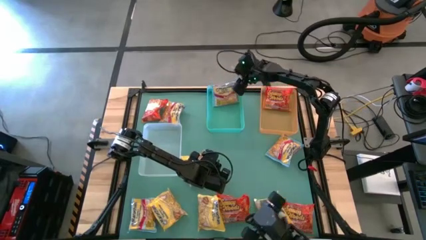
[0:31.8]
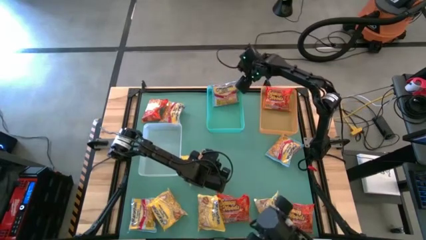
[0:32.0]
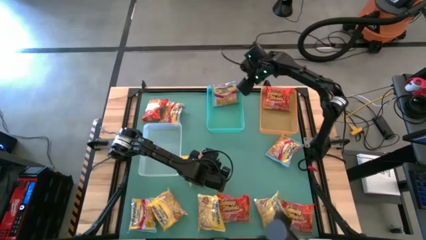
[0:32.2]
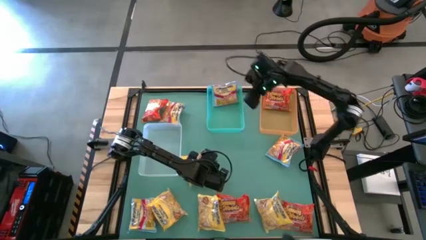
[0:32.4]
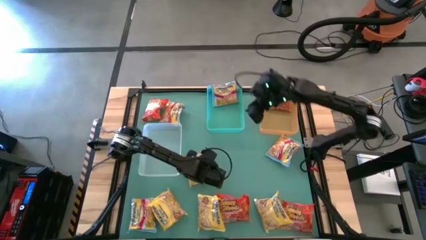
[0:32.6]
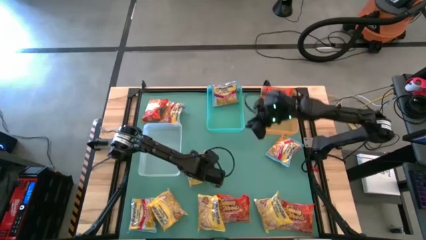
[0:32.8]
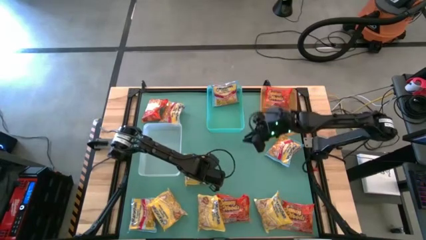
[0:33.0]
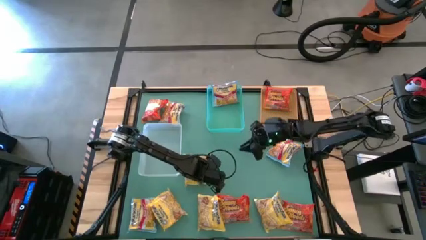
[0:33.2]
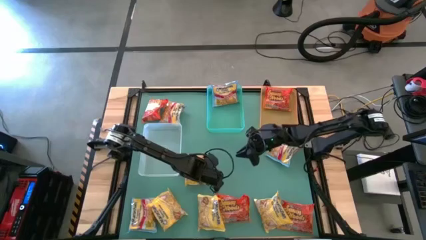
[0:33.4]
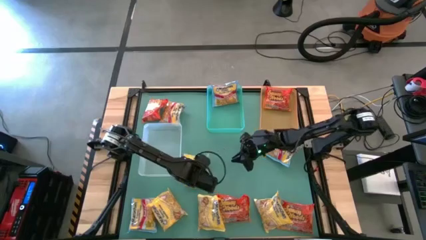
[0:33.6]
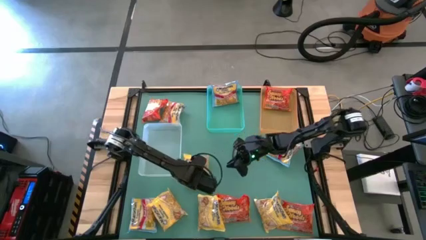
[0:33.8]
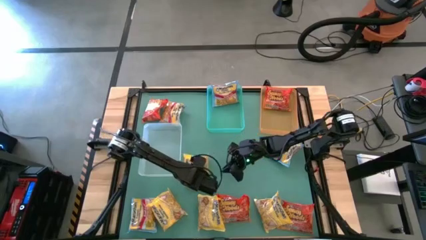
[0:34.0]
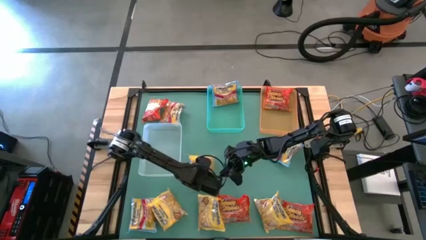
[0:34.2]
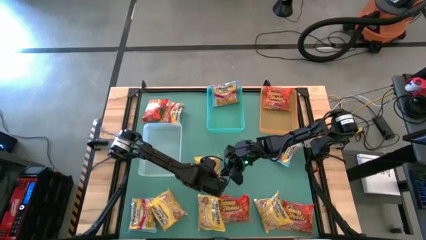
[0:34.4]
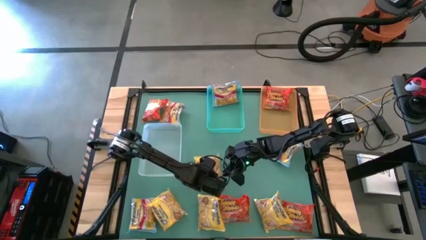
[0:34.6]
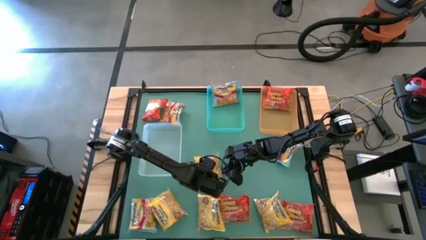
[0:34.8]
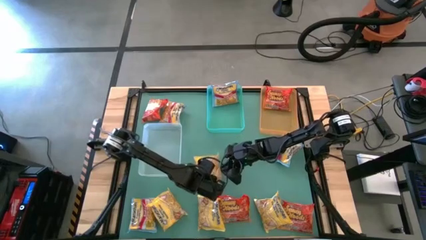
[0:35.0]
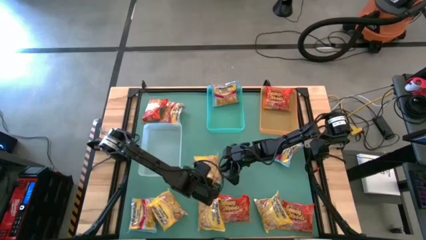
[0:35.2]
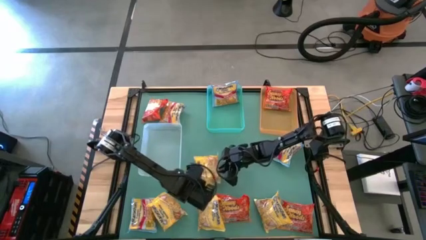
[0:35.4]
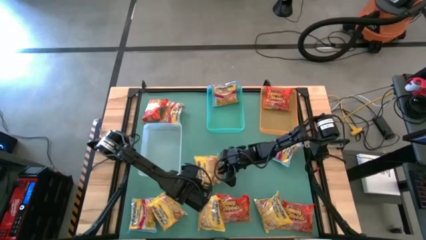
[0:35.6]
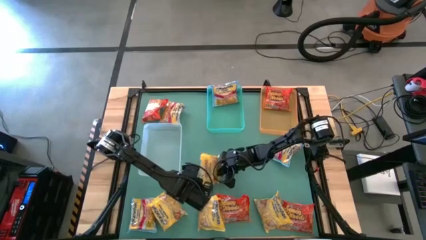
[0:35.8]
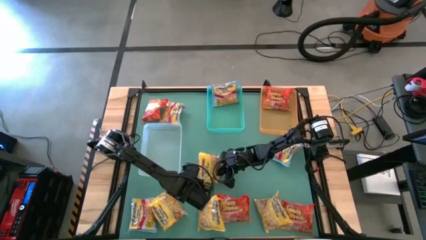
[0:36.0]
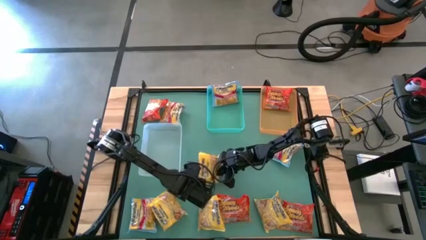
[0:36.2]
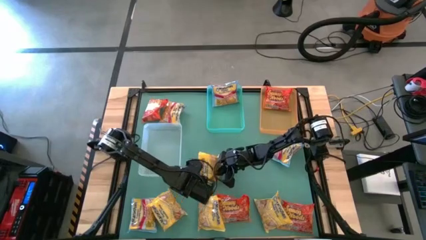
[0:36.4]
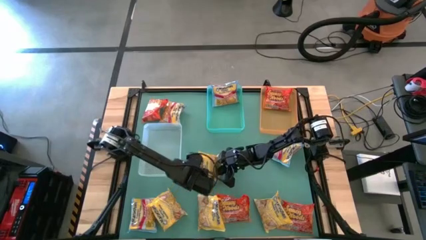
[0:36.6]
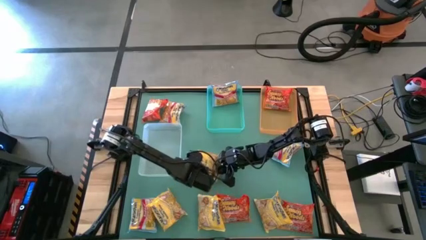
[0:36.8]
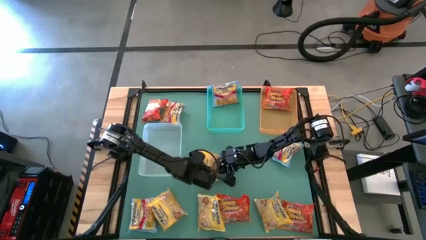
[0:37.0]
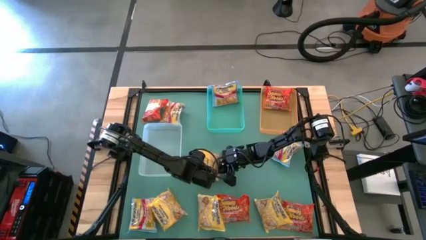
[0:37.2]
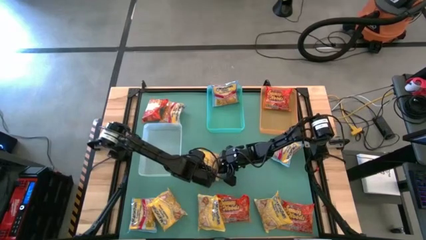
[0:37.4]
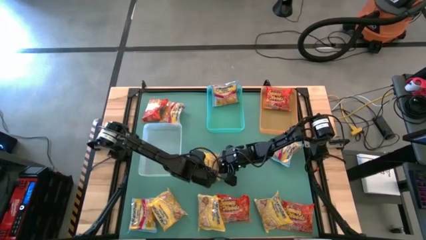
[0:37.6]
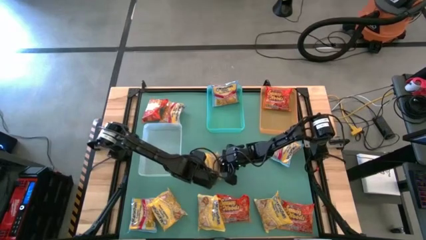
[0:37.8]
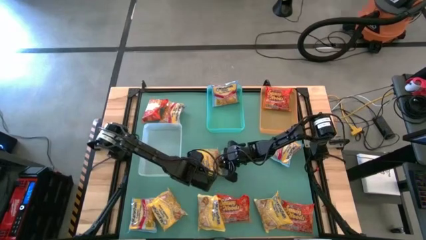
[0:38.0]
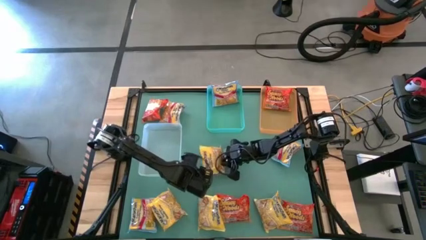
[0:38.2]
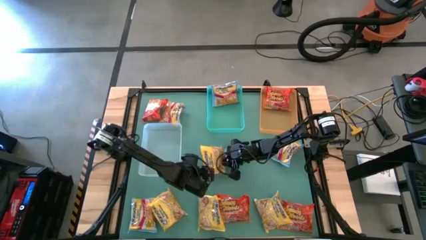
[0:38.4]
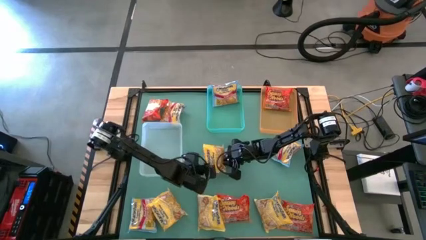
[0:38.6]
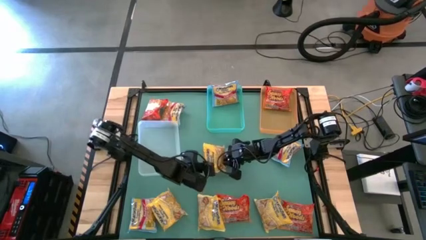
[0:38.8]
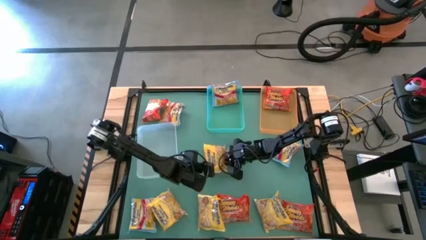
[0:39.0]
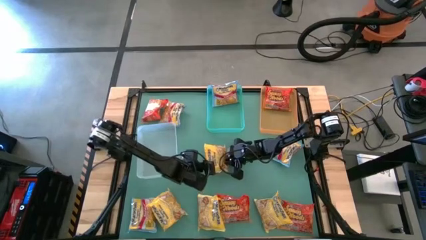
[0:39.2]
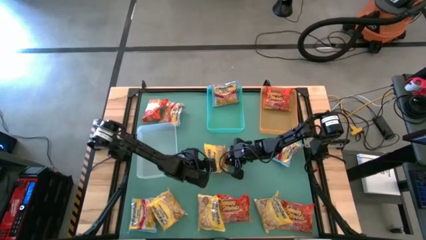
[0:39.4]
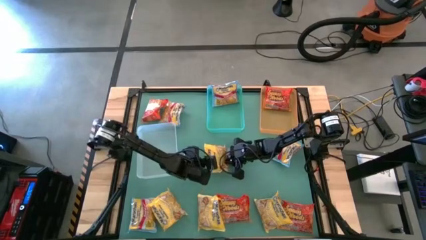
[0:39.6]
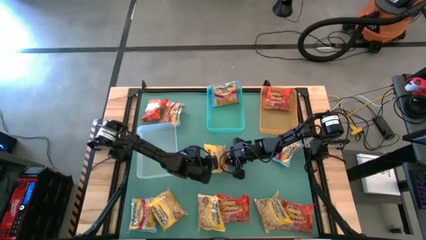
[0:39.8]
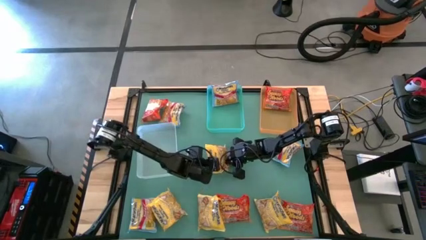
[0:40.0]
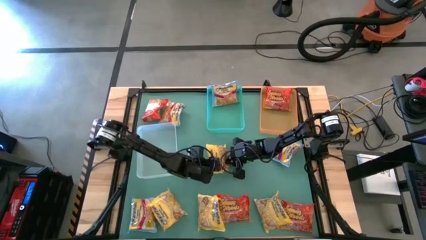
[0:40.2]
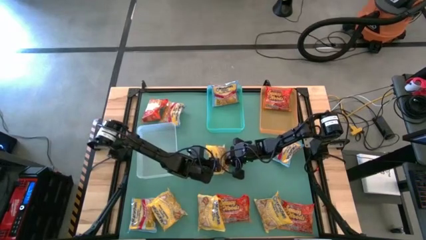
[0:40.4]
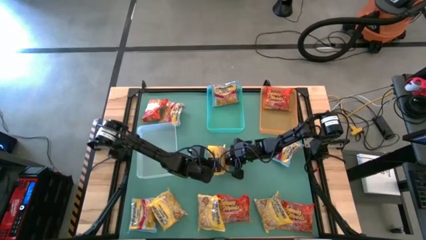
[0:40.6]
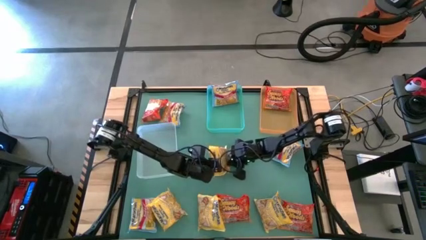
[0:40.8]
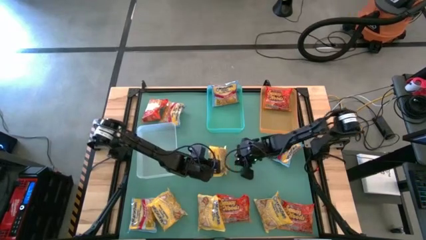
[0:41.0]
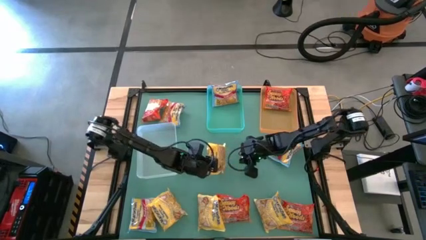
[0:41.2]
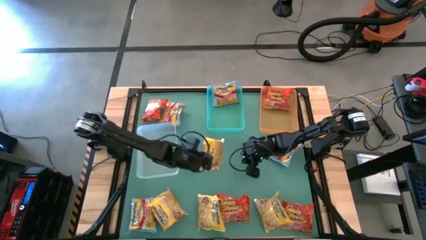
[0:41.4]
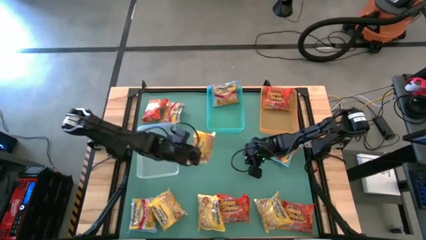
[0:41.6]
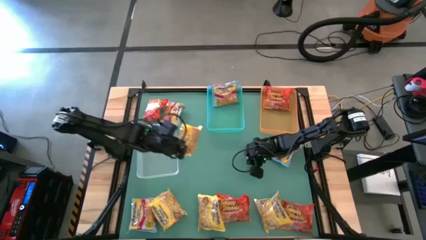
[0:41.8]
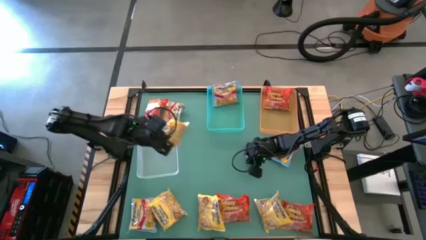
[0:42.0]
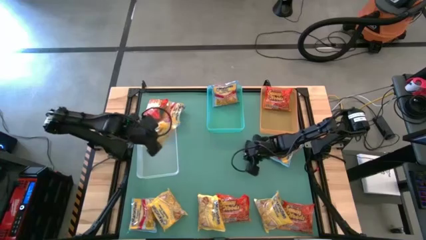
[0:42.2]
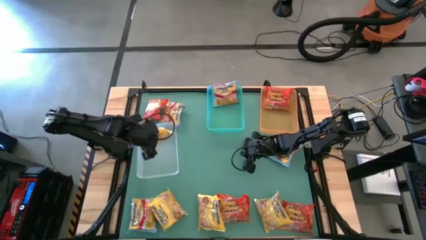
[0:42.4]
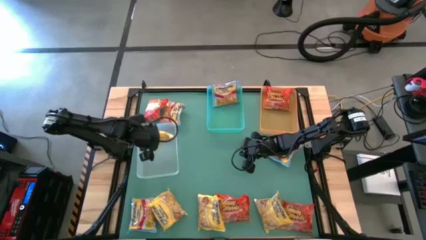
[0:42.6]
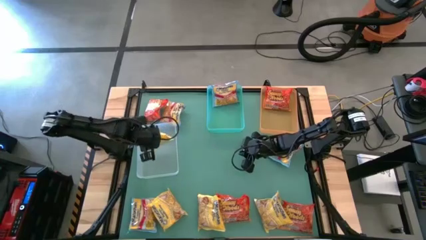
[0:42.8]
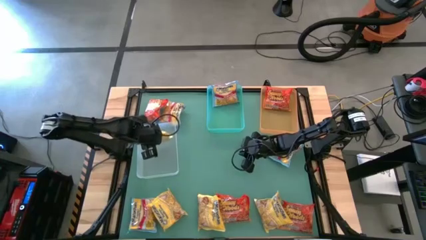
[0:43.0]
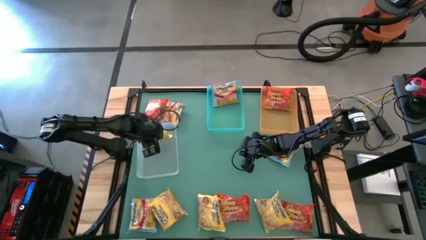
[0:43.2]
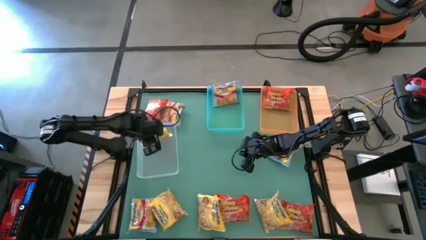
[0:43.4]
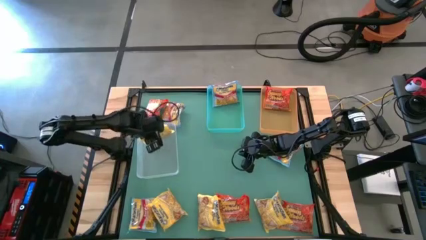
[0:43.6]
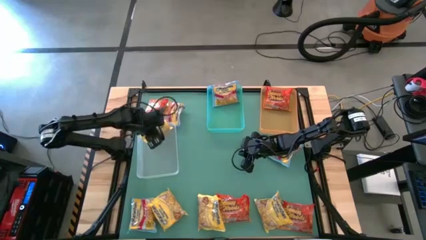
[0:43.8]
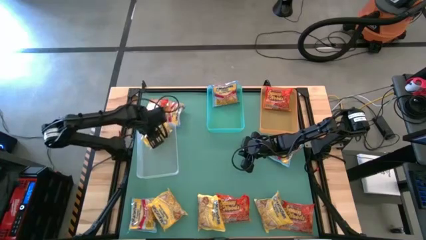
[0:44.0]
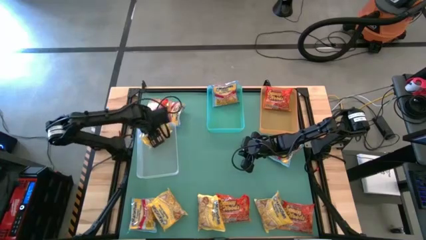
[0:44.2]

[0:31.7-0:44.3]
Task: Sort Maruchan noodles
Put the yellow noodle pack into the transparent bin
